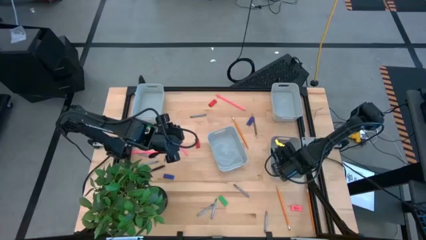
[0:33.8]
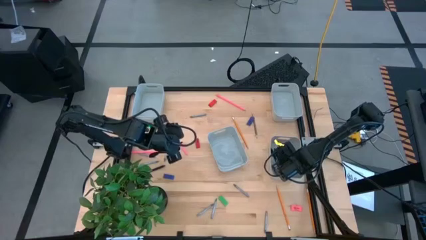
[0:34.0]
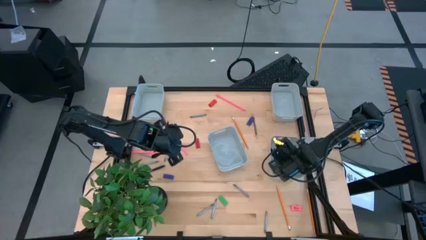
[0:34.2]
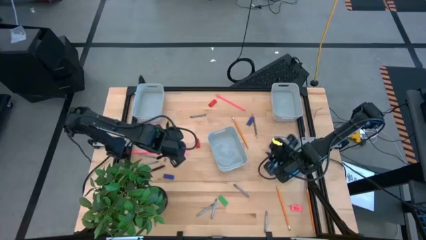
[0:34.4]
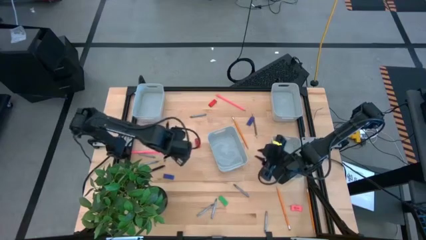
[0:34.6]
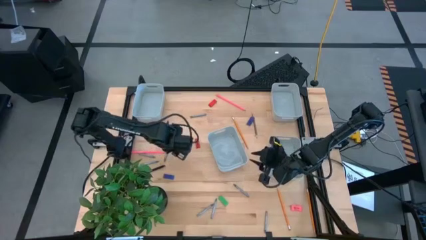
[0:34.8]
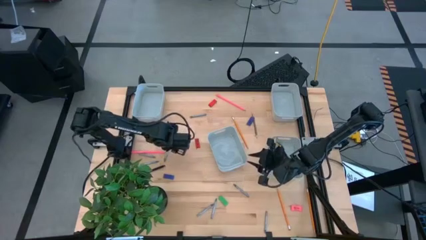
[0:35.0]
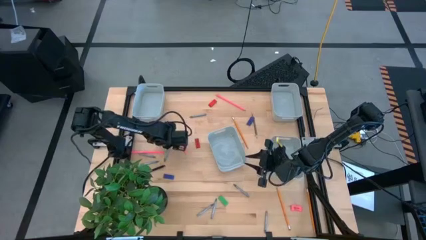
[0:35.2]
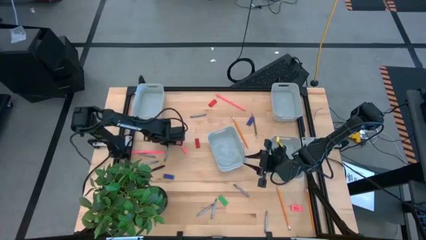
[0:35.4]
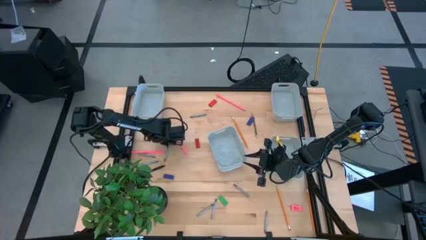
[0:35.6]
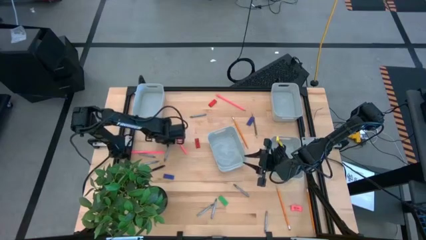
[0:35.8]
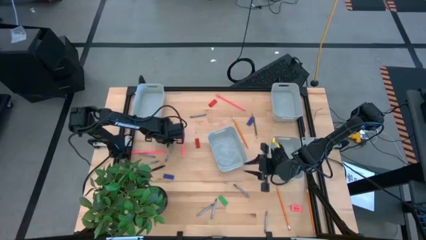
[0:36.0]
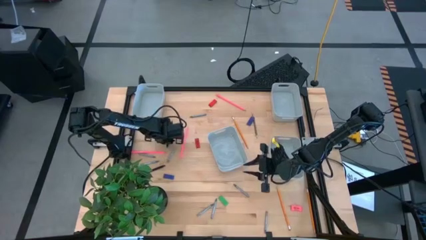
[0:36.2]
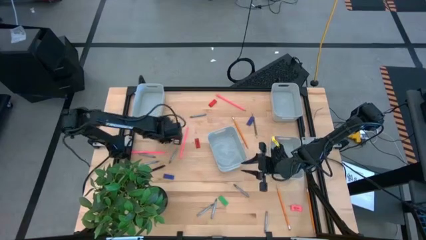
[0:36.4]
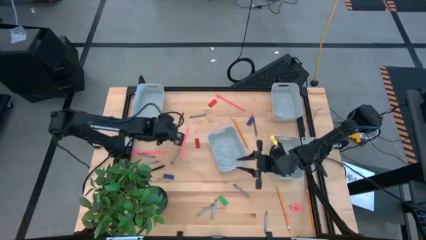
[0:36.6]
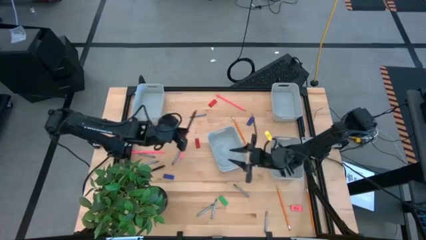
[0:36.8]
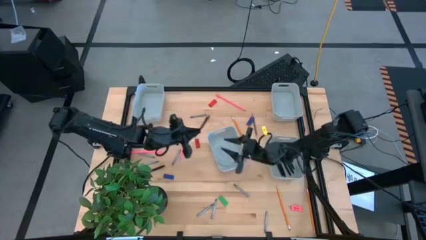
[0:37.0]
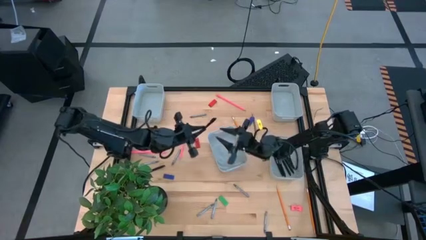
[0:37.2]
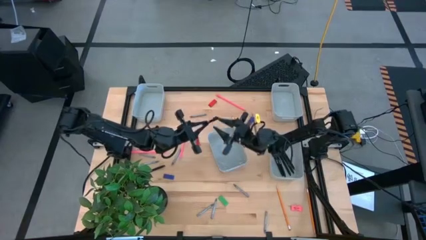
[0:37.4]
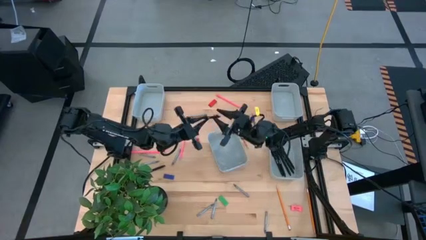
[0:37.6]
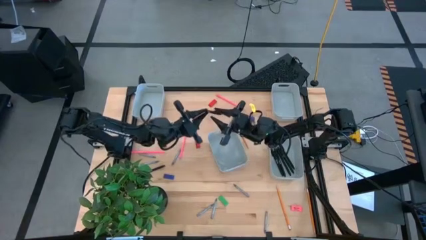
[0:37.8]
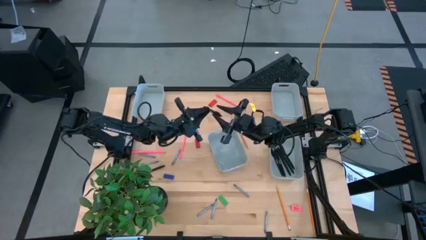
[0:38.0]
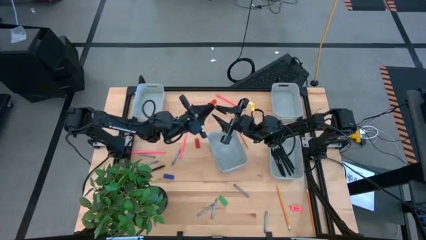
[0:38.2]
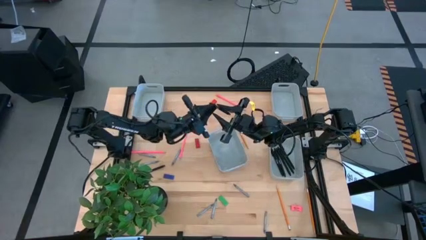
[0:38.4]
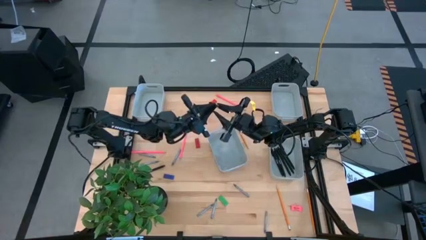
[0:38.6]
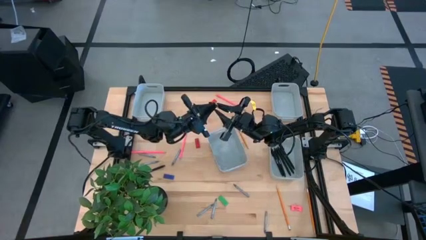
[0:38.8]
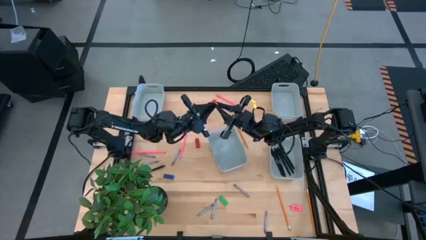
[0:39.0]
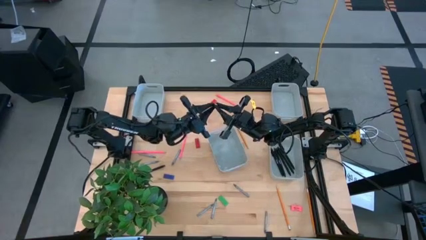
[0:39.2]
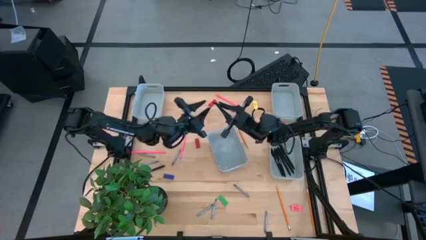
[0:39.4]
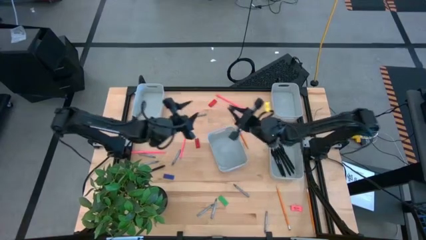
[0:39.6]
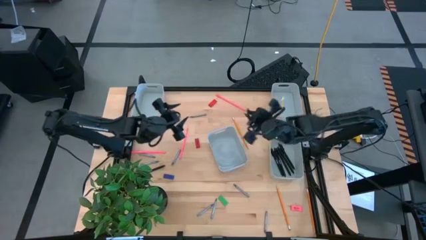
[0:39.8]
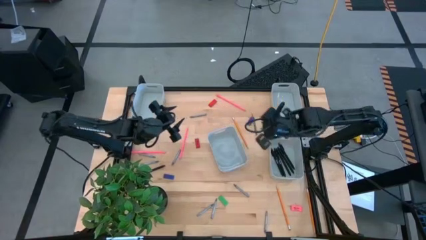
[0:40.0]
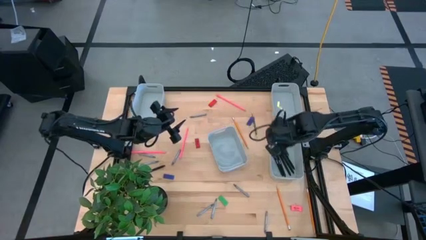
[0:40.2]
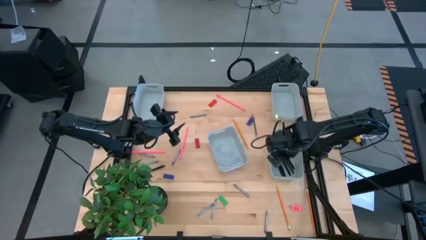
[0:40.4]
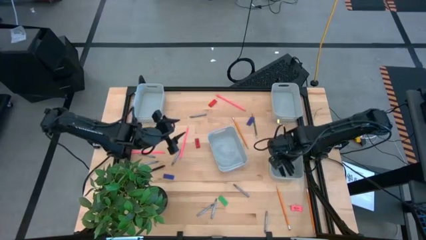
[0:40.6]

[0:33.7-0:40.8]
Task: Sort crayons/erasers/pens/pencils in bins
Put the black pen into the bottom right gray bin

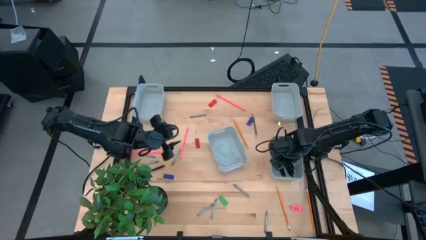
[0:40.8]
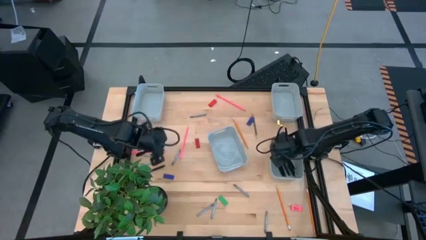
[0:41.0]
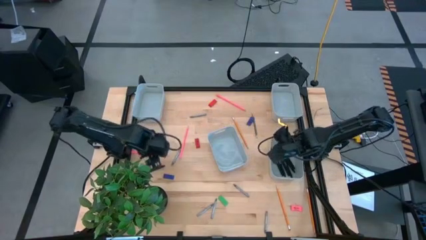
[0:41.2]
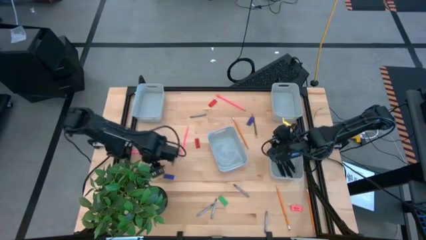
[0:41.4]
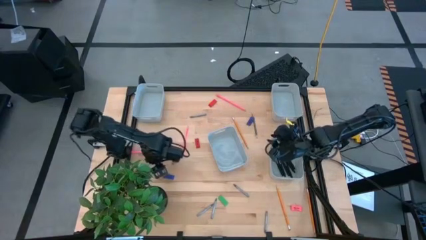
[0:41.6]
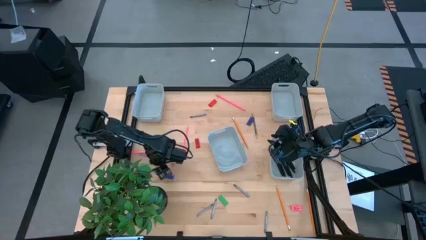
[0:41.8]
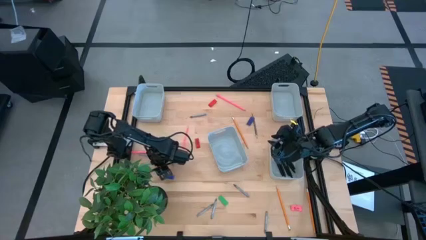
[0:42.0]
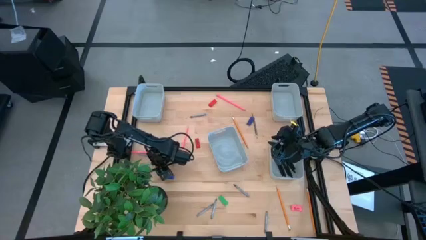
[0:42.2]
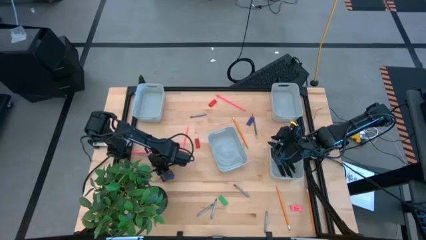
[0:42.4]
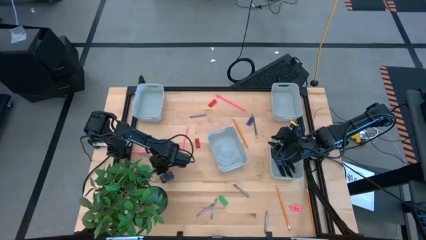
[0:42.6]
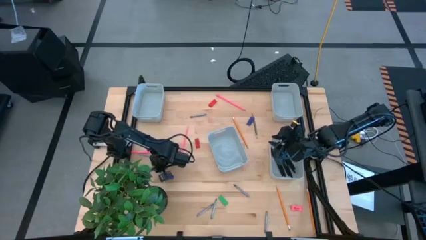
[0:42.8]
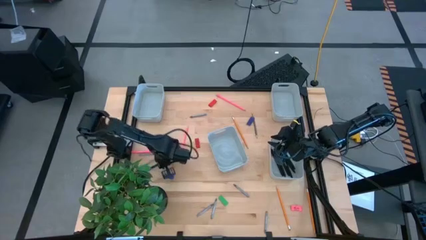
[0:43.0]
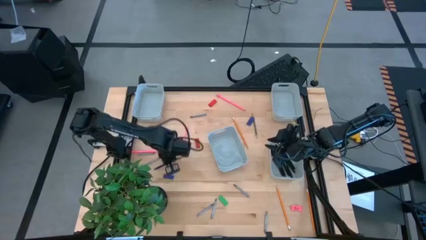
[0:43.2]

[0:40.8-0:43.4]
Put the black pen into the bottom right gray bin

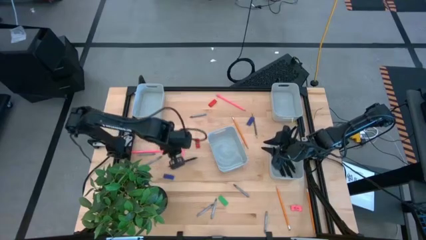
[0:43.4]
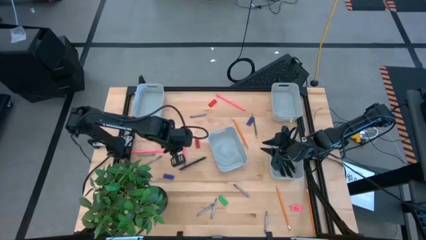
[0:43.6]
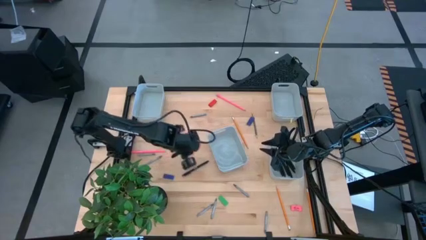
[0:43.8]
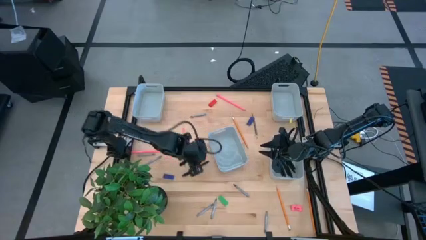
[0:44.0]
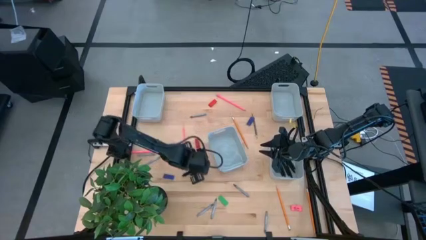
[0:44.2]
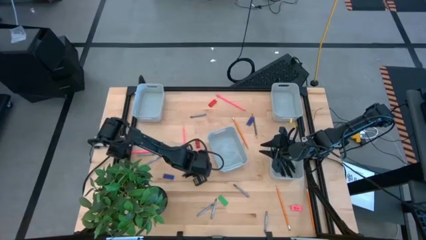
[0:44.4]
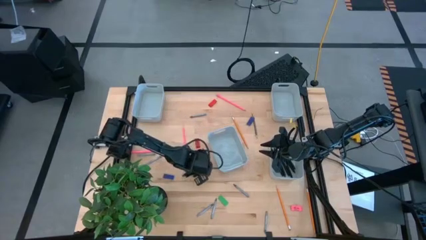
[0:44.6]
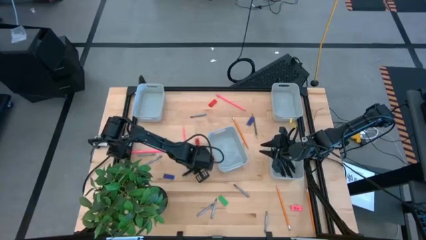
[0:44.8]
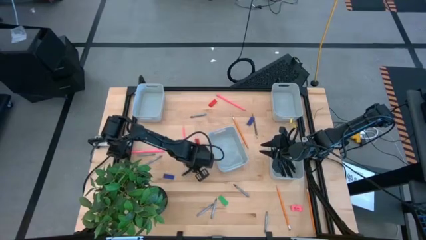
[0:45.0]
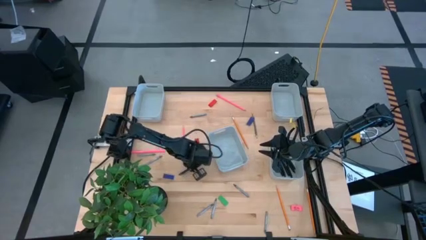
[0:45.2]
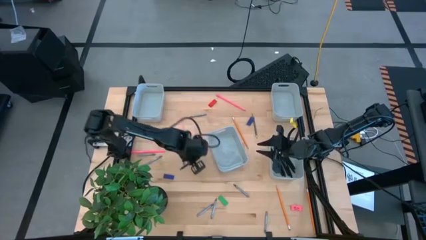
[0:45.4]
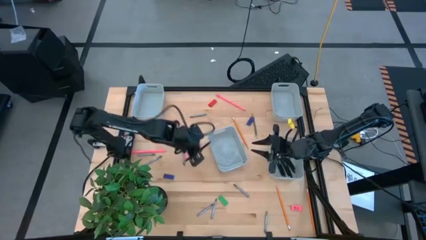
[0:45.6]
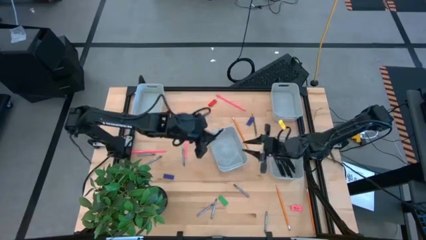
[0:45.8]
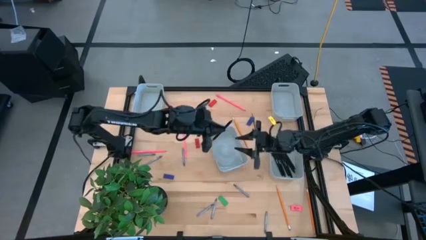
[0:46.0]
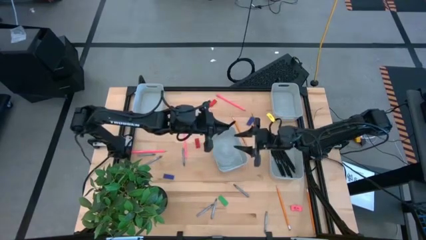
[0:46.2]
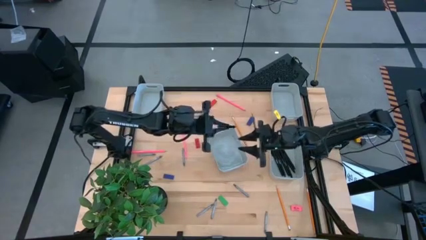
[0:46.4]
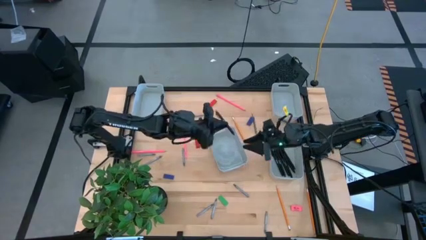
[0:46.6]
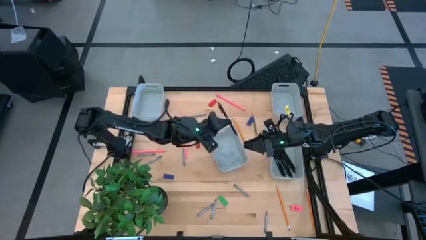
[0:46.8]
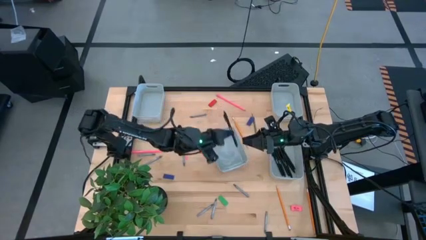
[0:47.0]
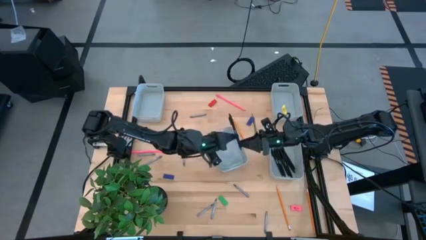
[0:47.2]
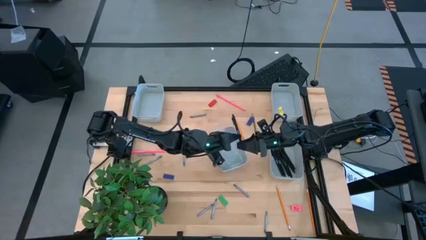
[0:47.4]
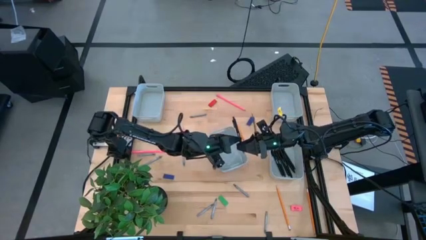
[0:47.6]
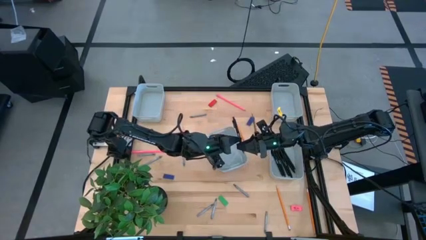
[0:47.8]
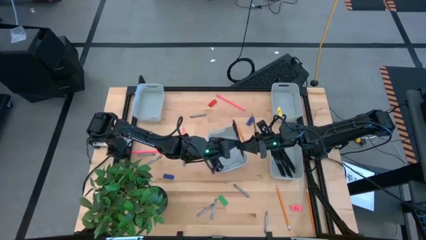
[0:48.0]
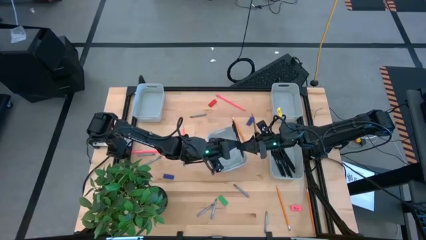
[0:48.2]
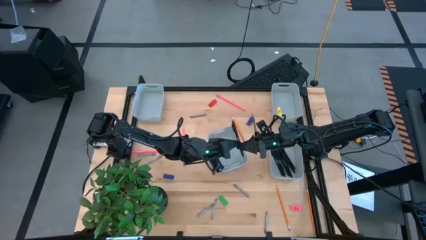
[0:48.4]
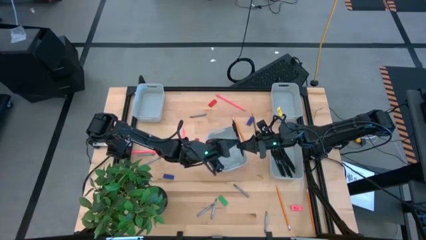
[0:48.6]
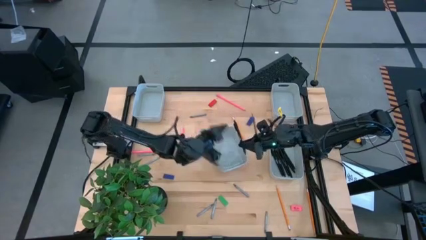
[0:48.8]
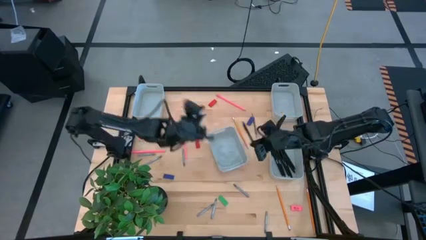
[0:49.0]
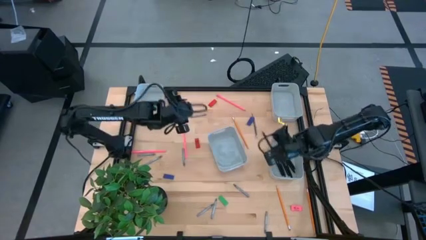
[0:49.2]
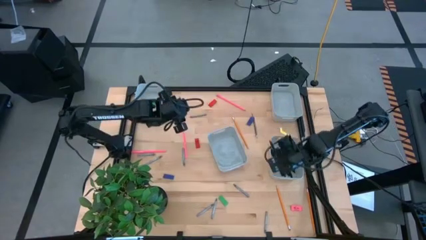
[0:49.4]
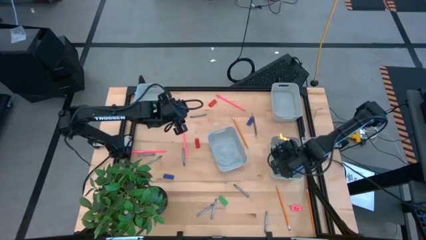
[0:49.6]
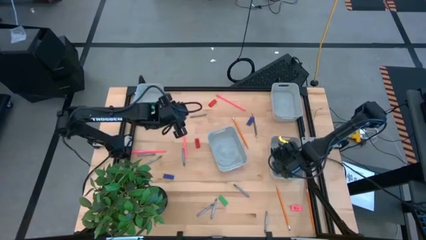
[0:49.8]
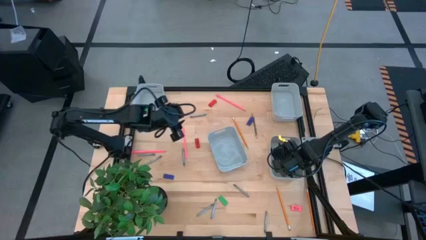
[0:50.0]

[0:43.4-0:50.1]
Put the black pen into the bottom right gray bin
